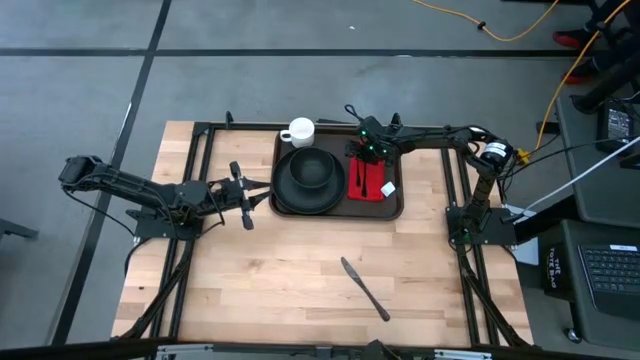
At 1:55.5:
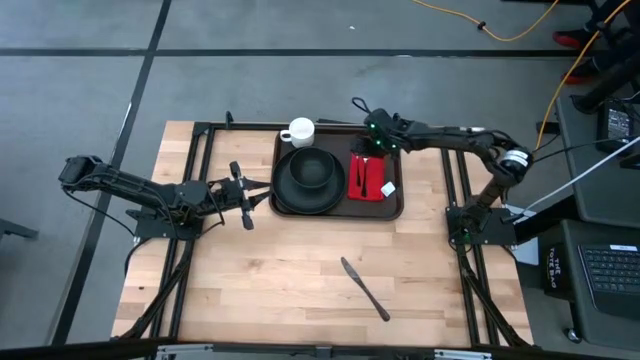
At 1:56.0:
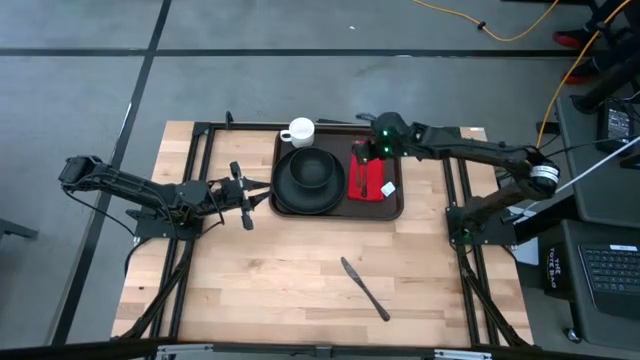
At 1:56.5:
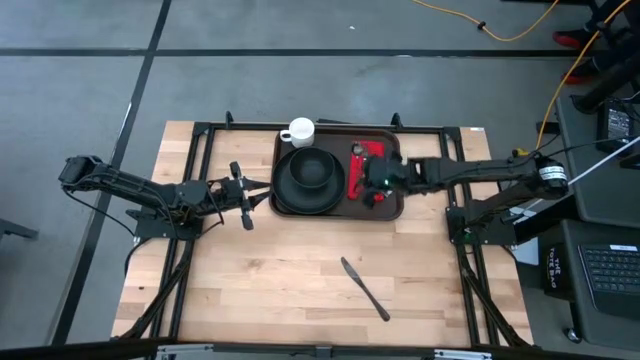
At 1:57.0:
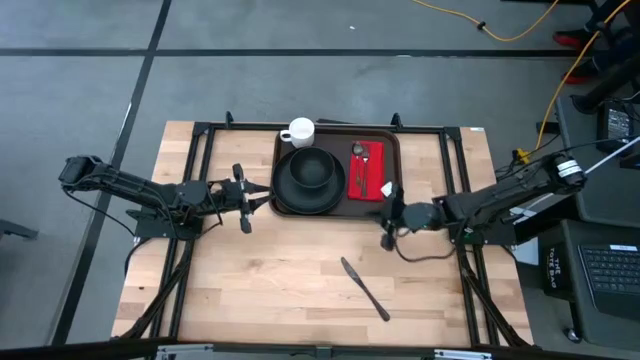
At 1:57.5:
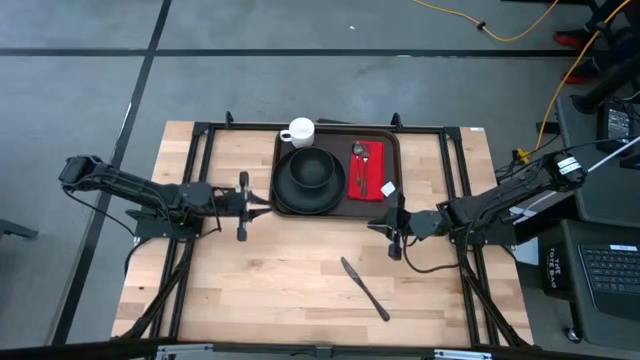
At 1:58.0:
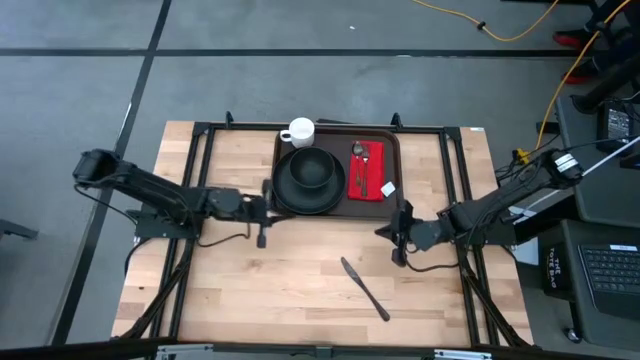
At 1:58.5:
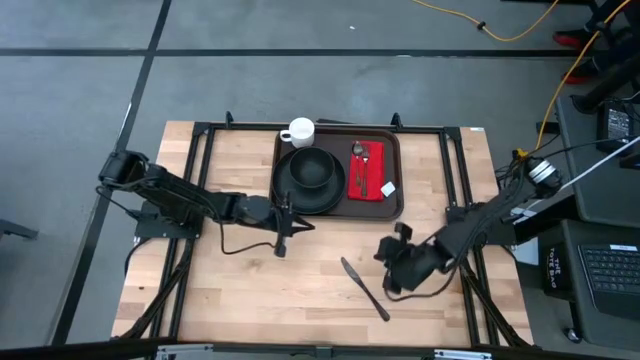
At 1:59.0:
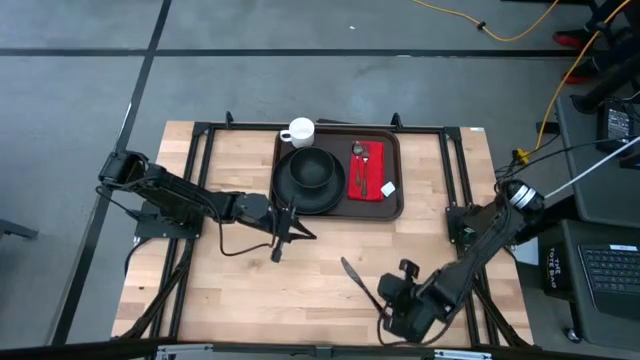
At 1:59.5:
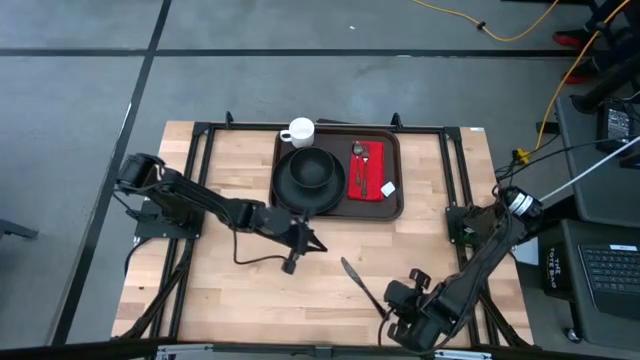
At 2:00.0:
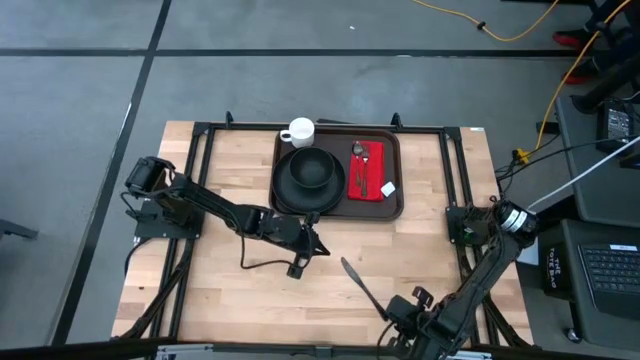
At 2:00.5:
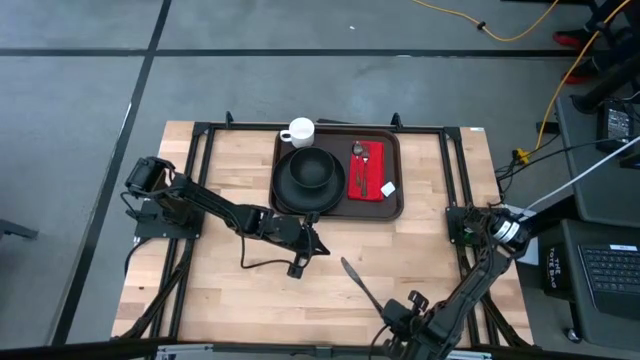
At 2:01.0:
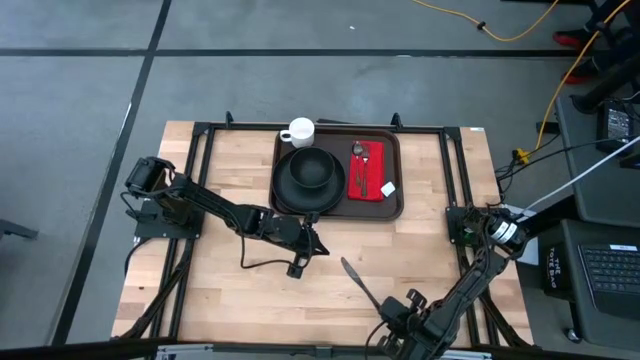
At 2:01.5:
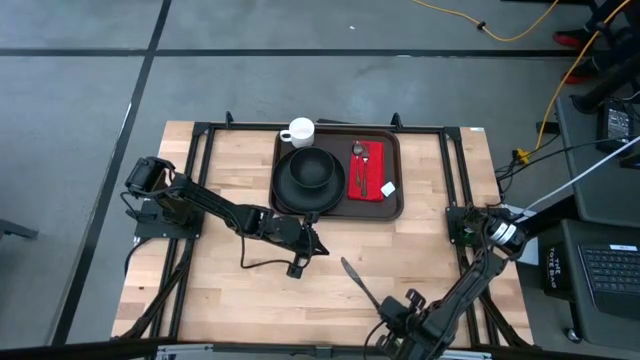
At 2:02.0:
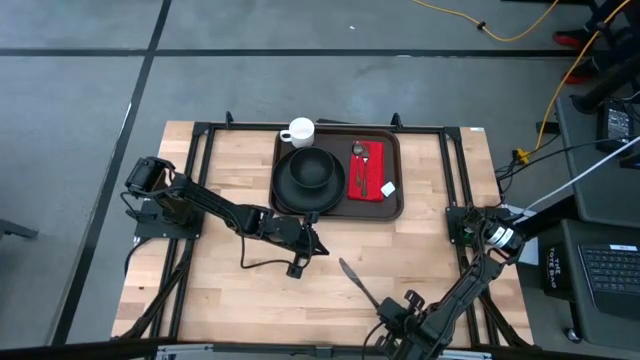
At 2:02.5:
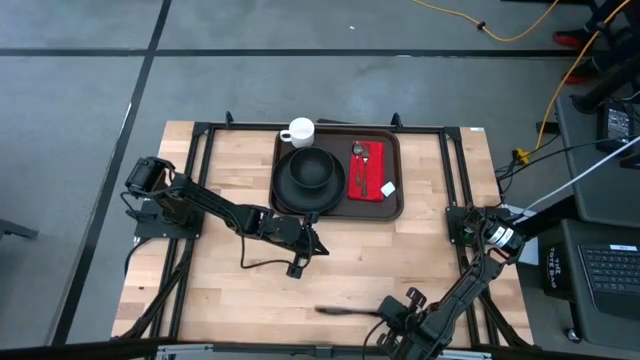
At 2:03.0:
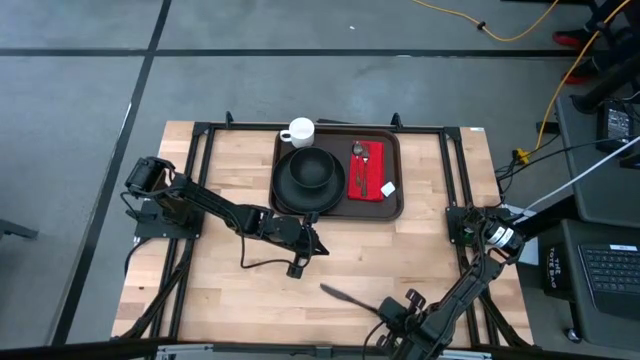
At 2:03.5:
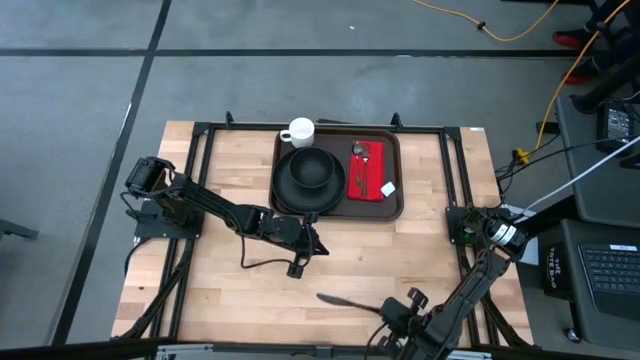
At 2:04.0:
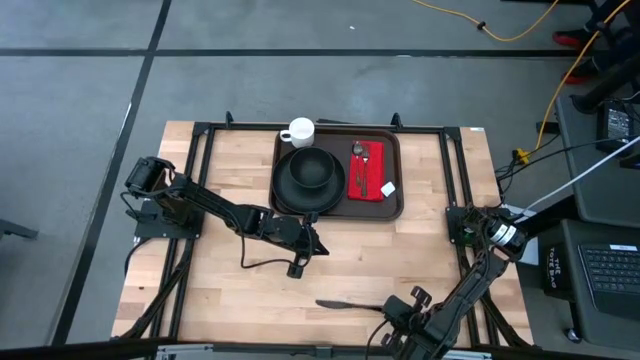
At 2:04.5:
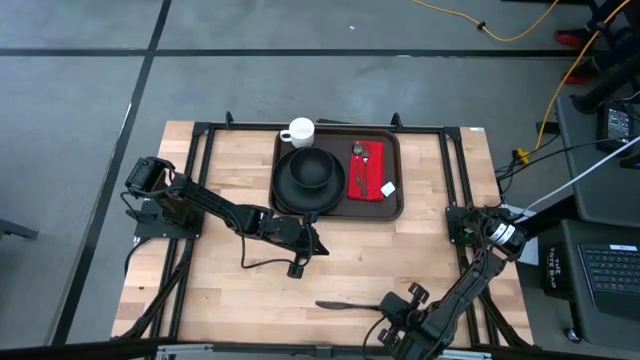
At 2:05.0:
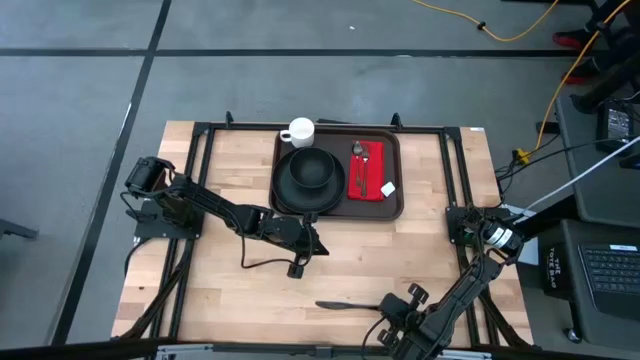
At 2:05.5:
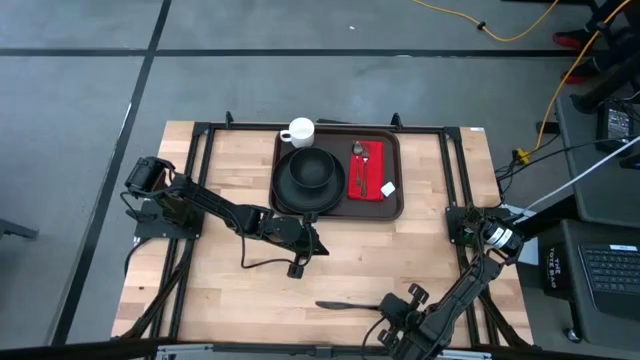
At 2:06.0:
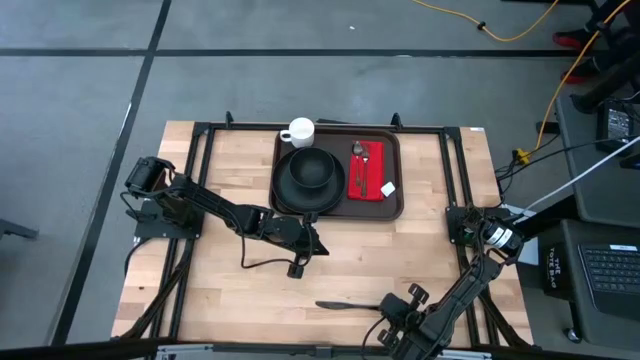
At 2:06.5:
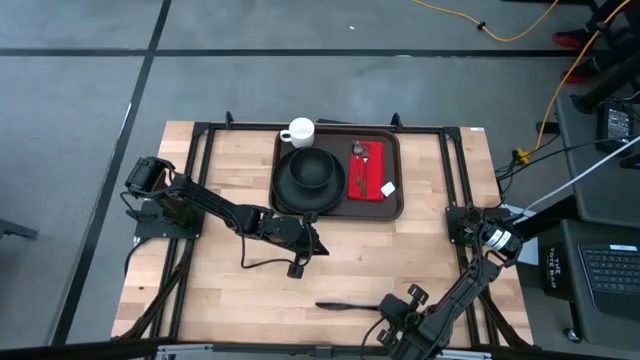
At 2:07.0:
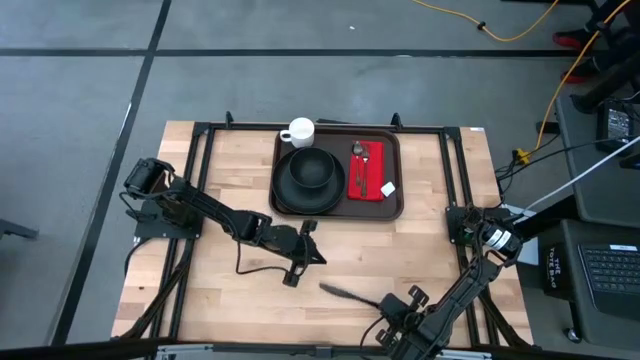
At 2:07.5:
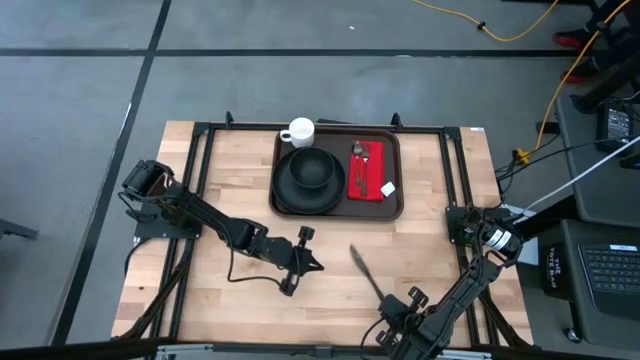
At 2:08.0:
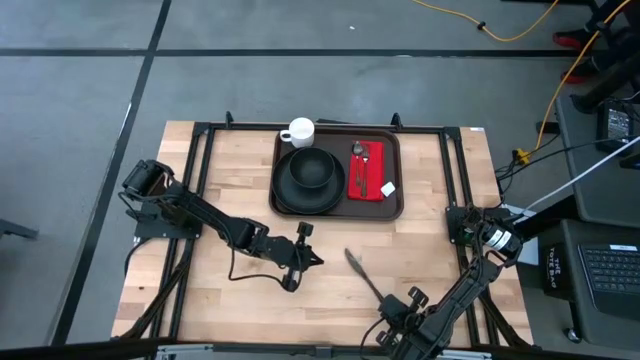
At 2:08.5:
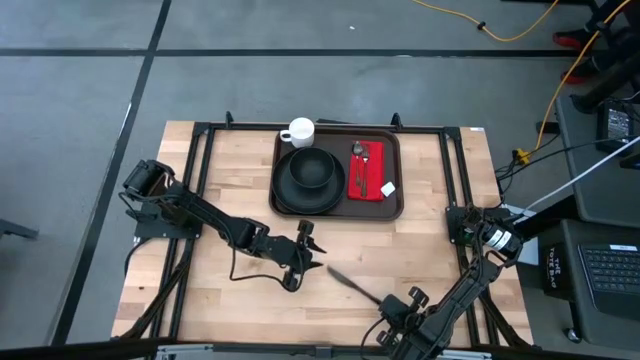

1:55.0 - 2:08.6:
Task: Set up tray
Put the black knife to the right of the black fork on the red napkin on the brown serving tray

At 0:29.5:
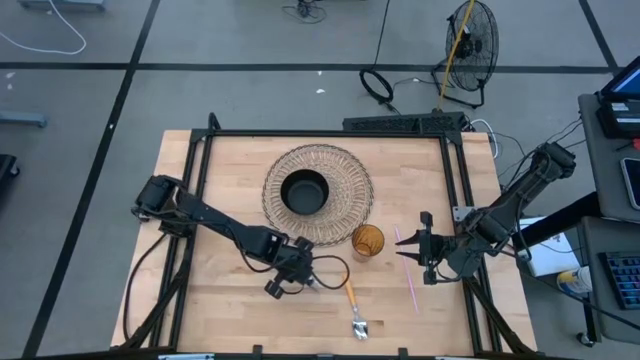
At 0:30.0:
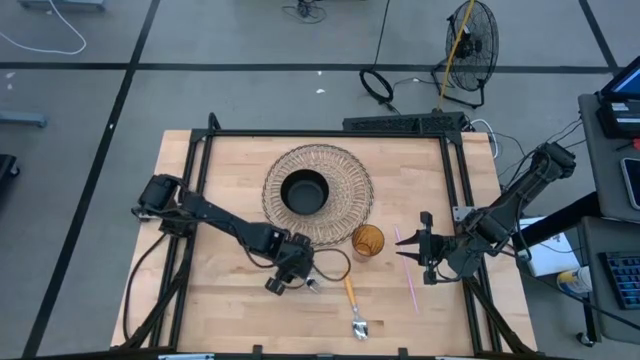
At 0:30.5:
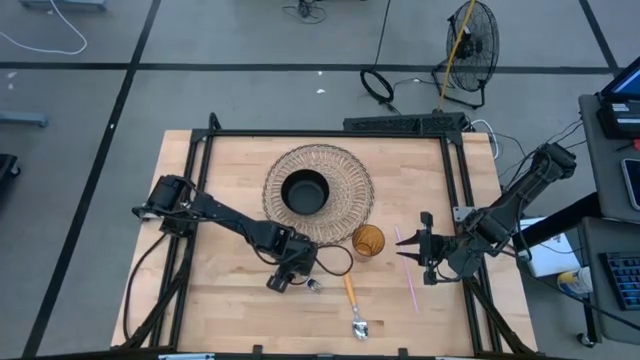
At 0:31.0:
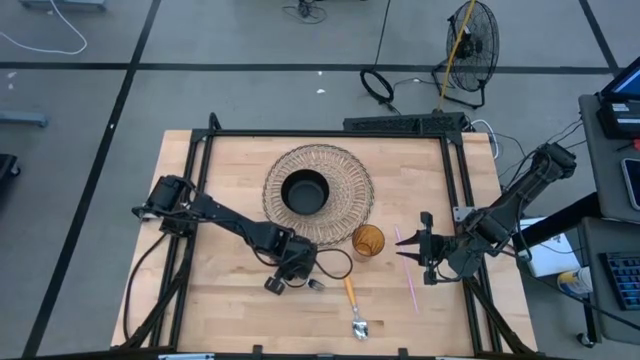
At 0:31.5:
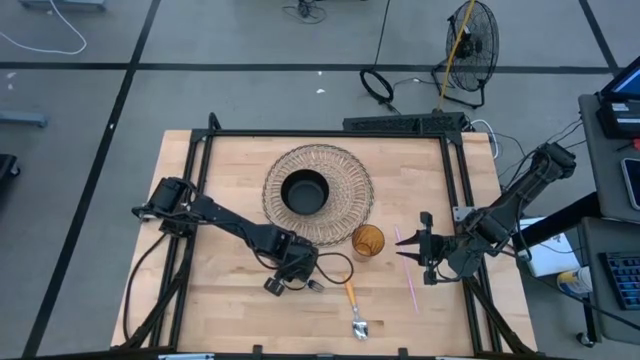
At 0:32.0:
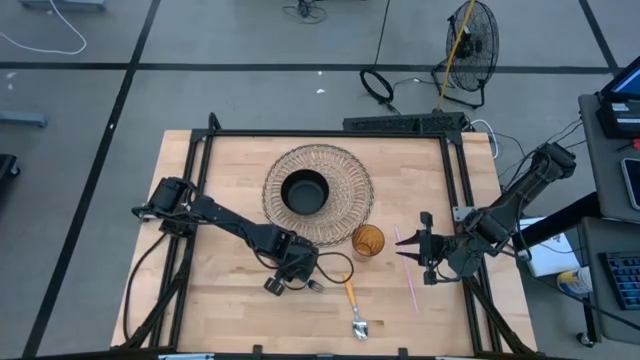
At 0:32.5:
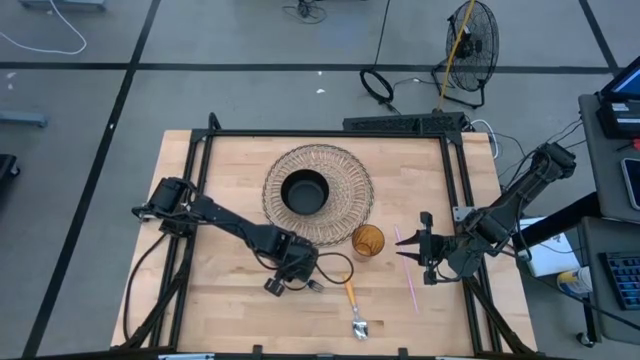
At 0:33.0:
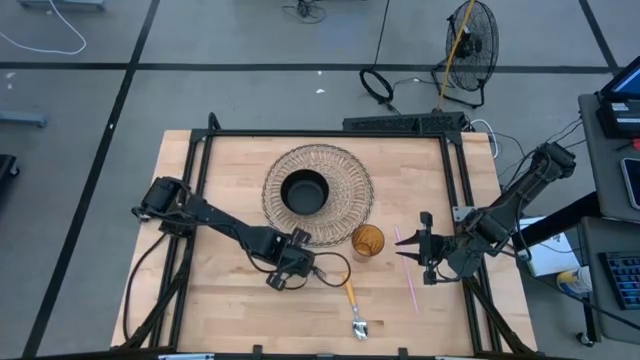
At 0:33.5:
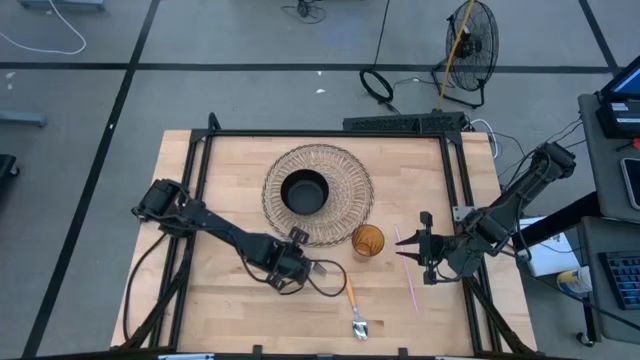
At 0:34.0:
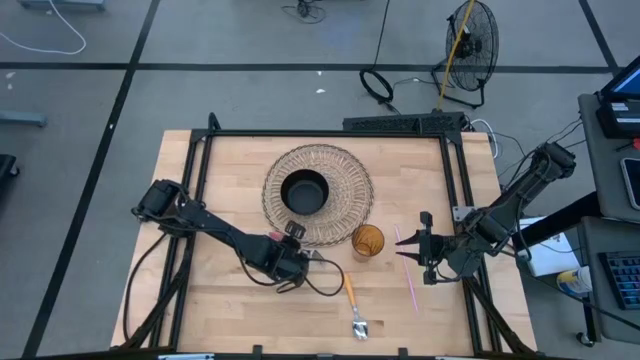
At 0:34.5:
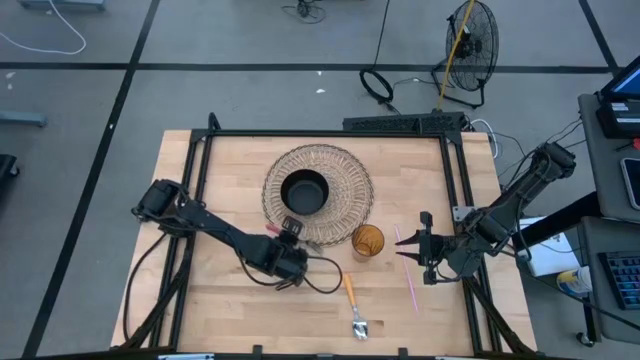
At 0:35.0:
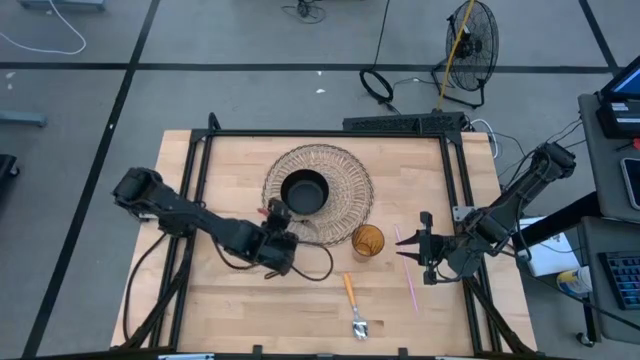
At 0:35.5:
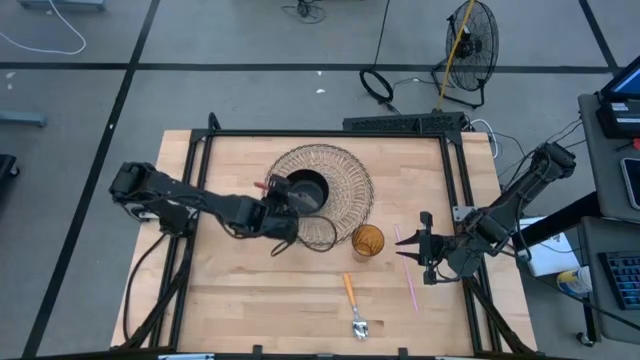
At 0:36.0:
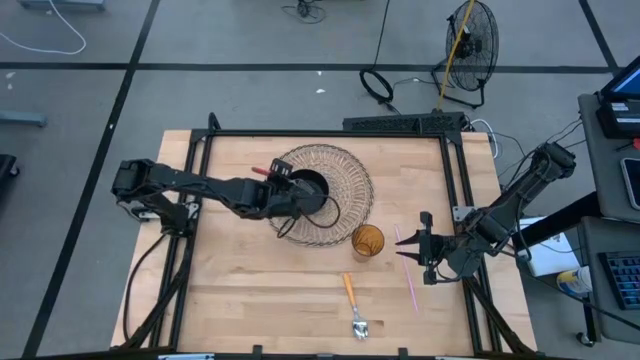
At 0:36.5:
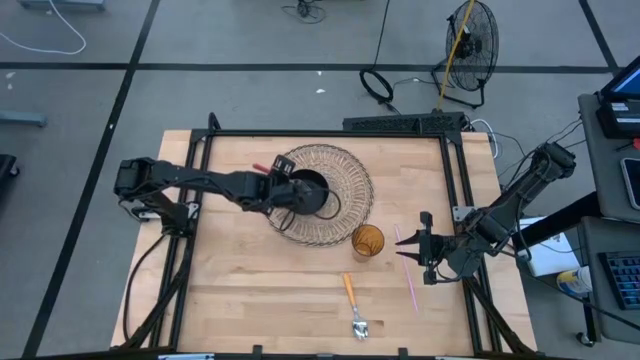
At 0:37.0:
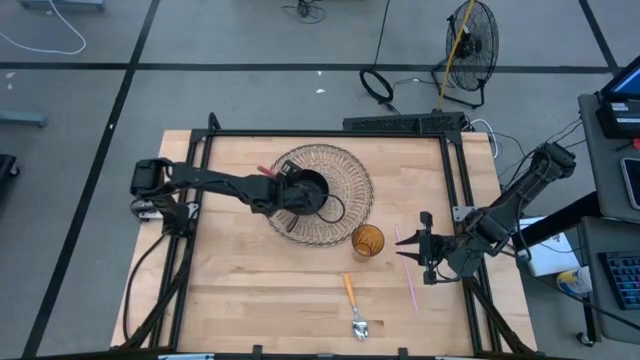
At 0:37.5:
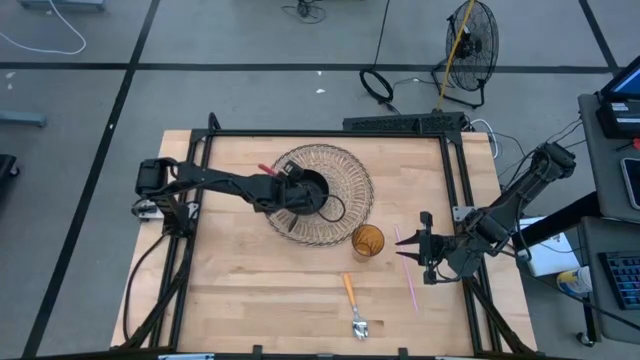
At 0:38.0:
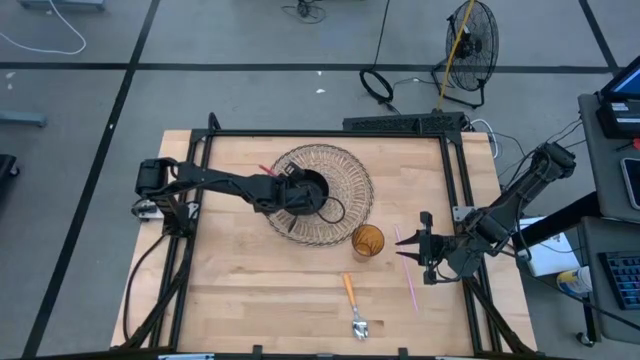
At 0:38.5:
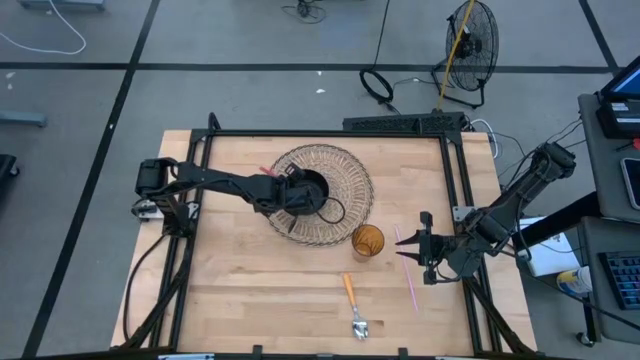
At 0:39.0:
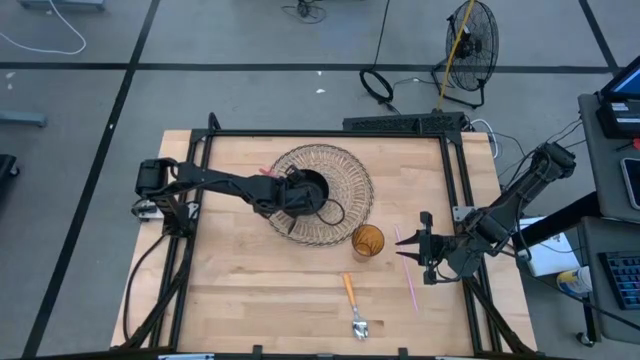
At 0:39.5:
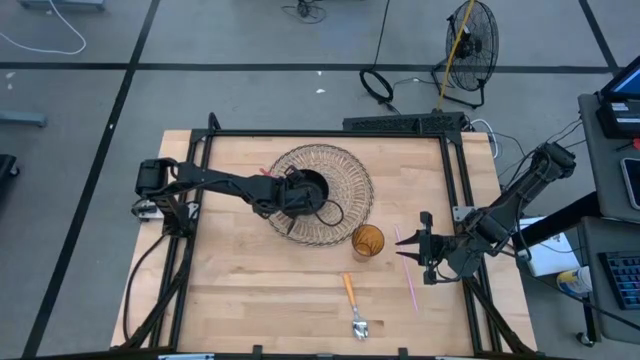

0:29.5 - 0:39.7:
Task: Pick & Place Utensil
Put the pink fork into the black bowl on the woven mat
